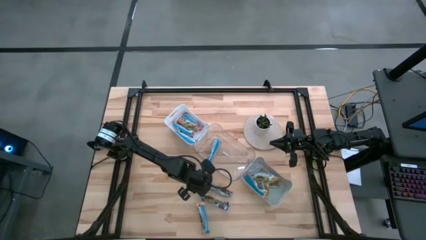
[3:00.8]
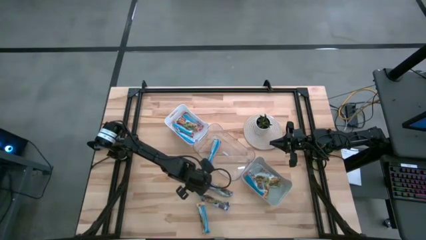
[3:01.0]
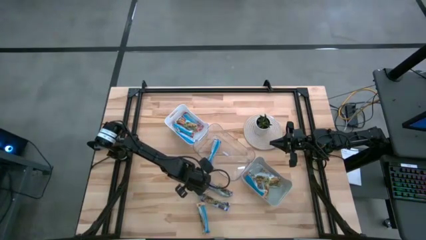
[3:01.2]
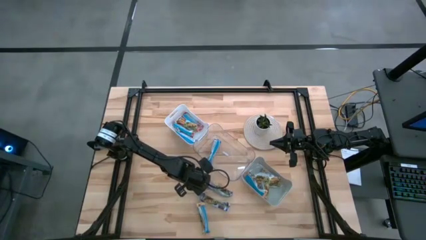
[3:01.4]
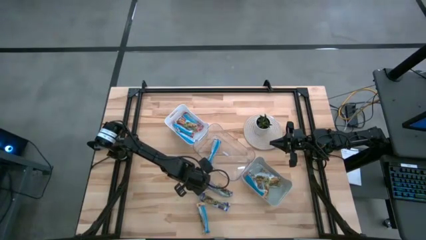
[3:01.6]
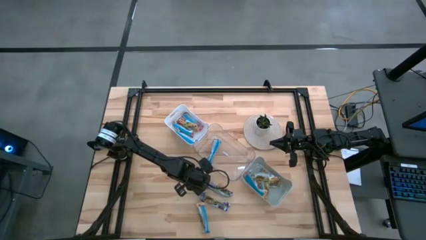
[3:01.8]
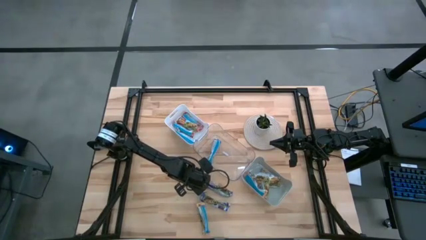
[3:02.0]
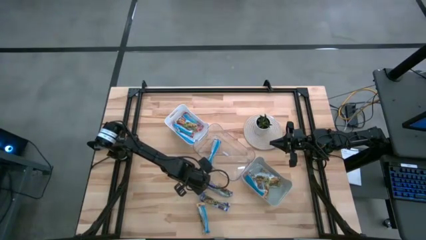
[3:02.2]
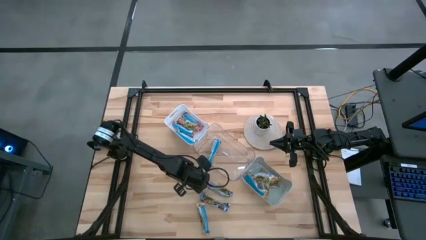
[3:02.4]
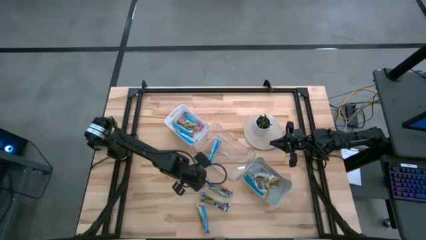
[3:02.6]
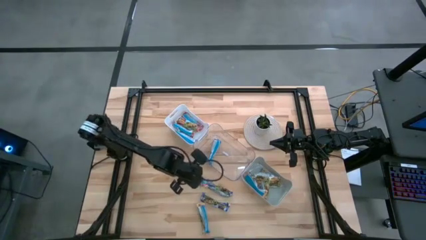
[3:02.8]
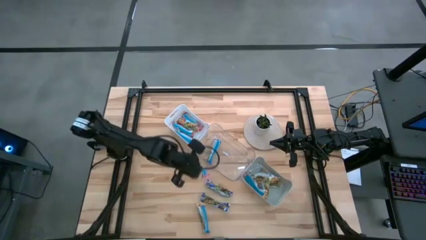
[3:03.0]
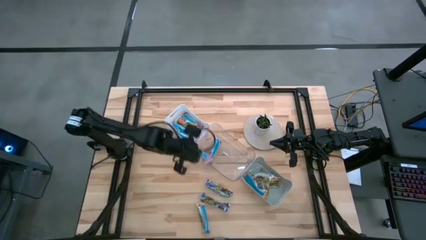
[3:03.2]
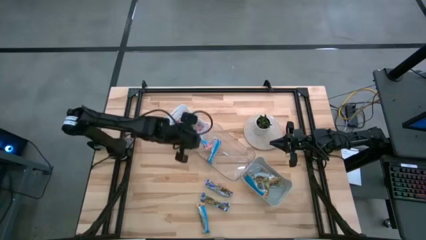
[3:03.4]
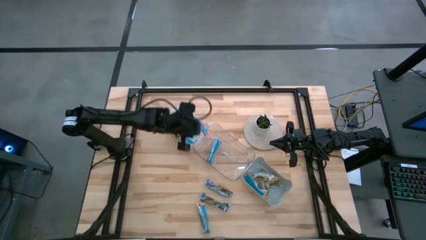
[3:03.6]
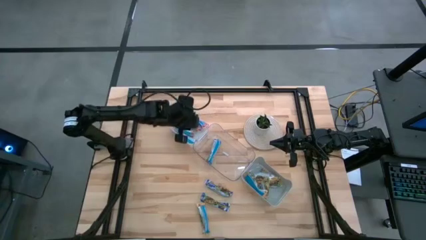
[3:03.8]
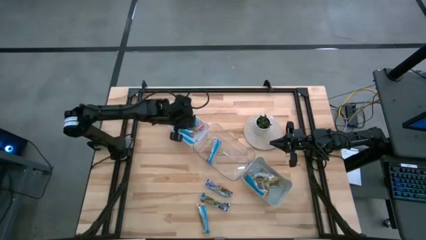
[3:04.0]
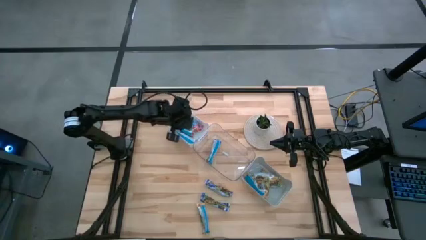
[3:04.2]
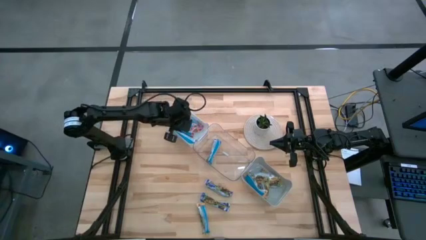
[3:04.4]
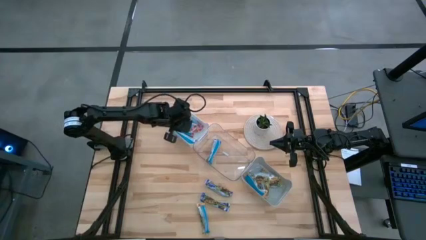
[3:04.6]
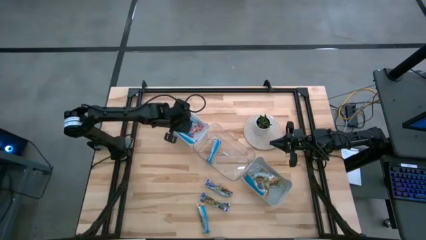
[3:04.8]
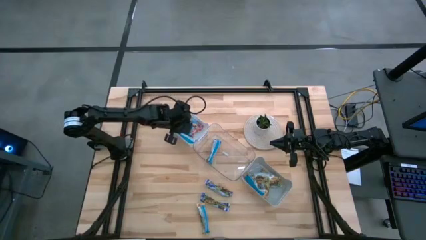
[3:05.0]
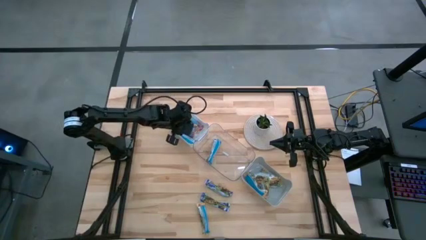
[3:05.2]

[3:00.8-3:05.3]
Task: Pick and place Granola Bars by type
Put the red granola bar into the white bin

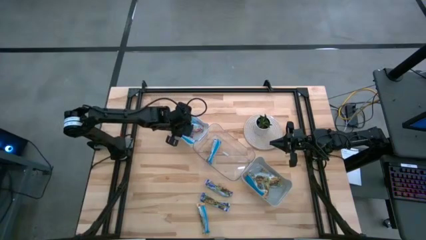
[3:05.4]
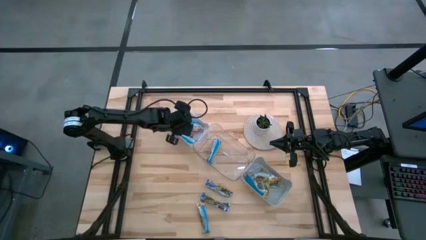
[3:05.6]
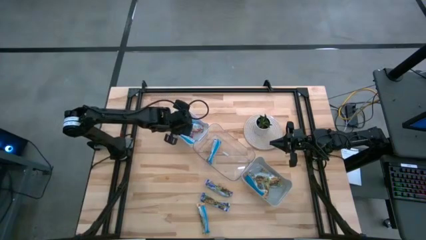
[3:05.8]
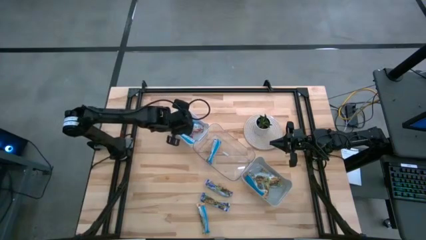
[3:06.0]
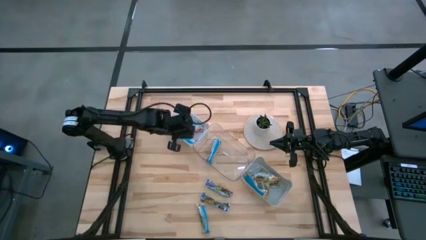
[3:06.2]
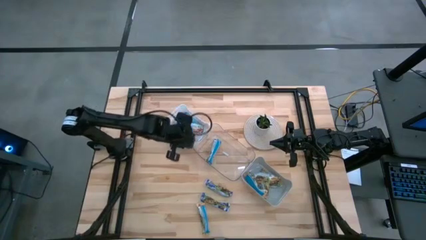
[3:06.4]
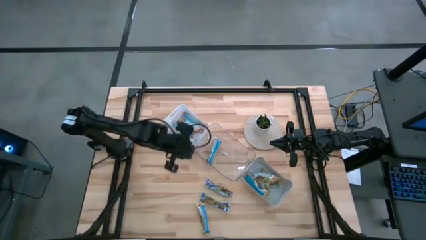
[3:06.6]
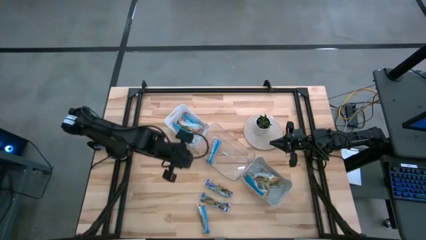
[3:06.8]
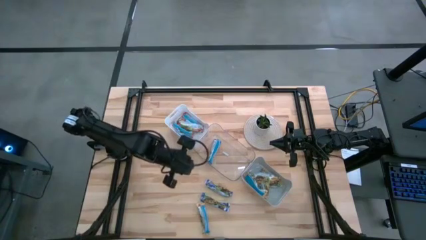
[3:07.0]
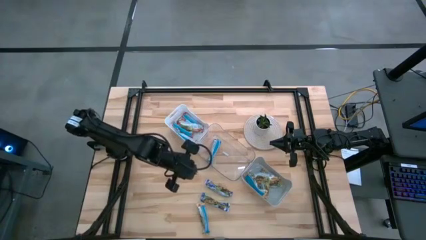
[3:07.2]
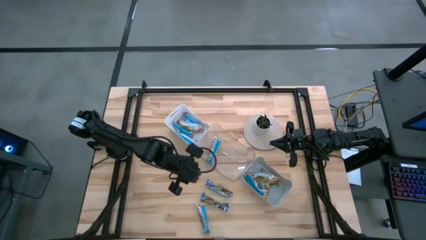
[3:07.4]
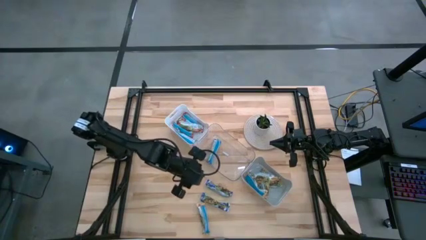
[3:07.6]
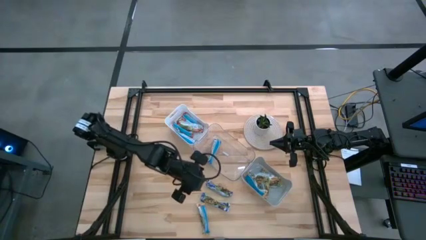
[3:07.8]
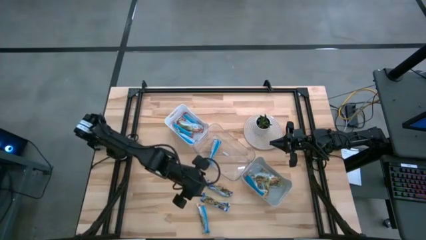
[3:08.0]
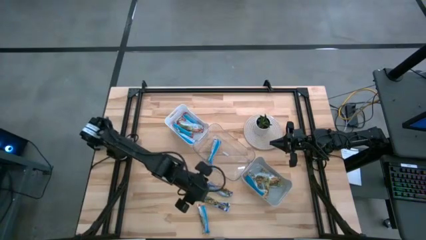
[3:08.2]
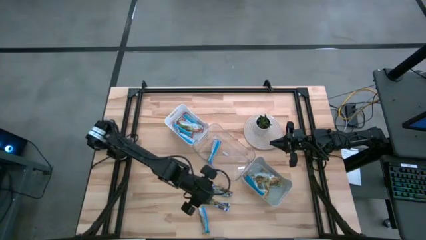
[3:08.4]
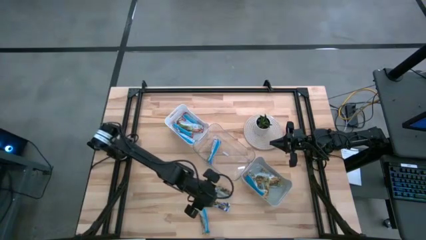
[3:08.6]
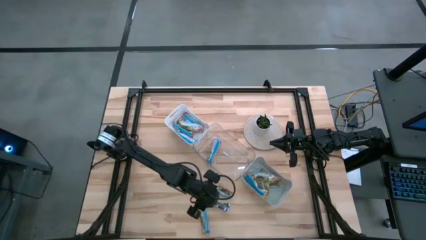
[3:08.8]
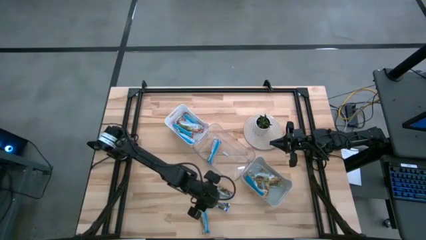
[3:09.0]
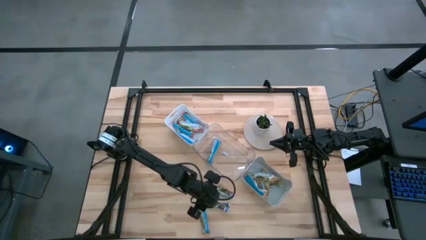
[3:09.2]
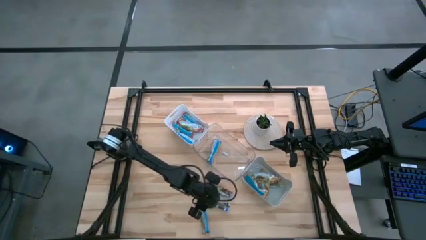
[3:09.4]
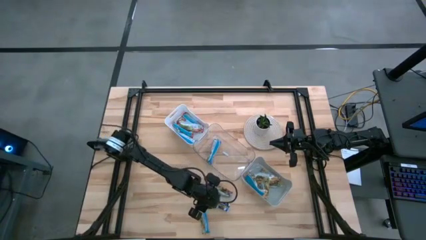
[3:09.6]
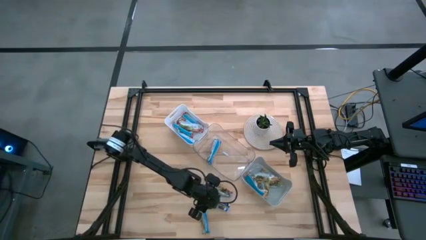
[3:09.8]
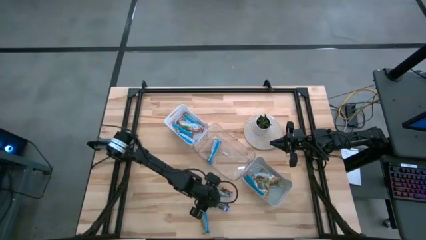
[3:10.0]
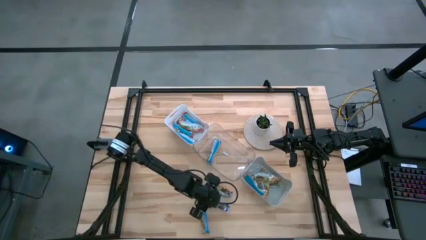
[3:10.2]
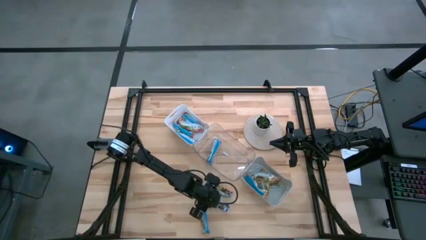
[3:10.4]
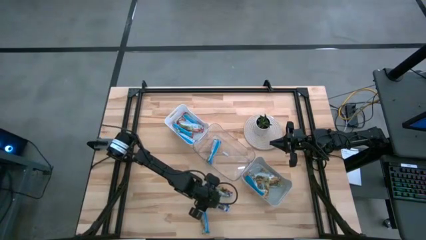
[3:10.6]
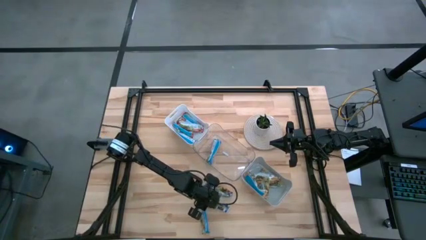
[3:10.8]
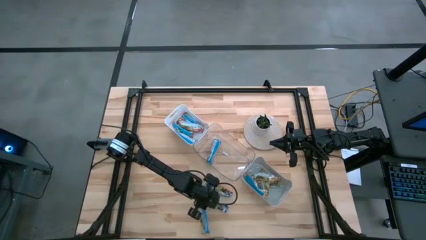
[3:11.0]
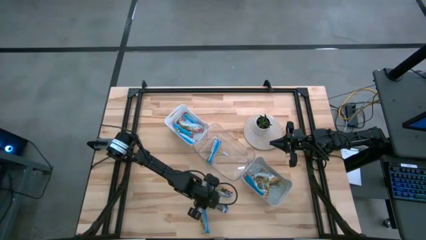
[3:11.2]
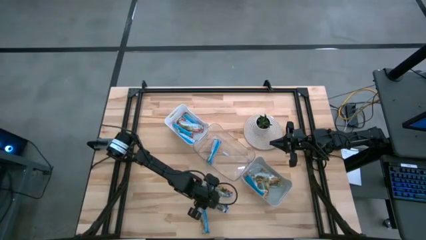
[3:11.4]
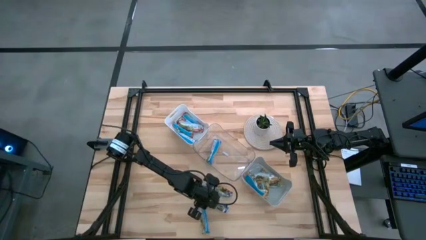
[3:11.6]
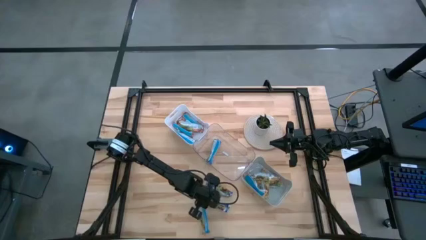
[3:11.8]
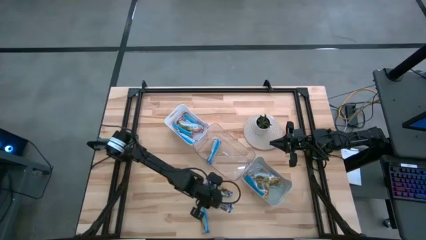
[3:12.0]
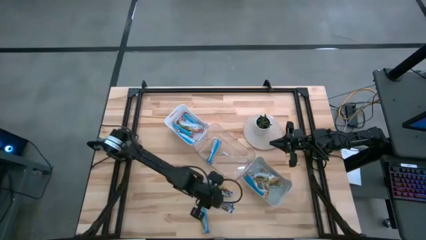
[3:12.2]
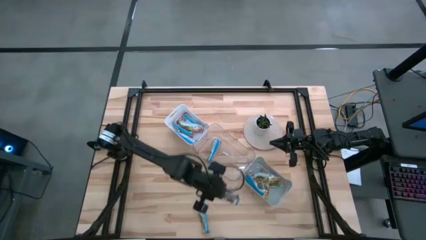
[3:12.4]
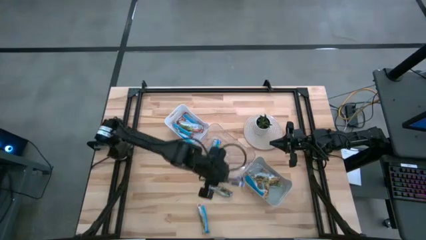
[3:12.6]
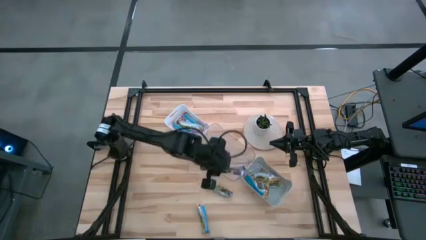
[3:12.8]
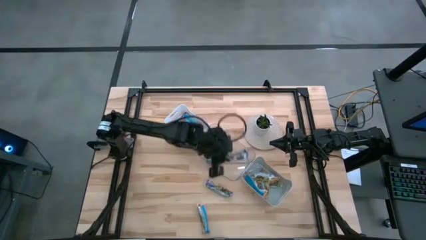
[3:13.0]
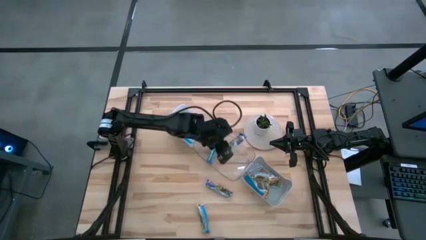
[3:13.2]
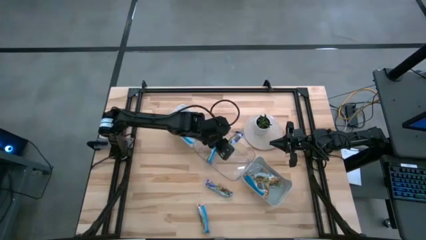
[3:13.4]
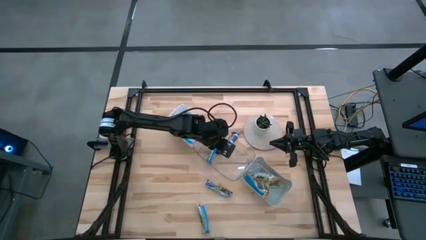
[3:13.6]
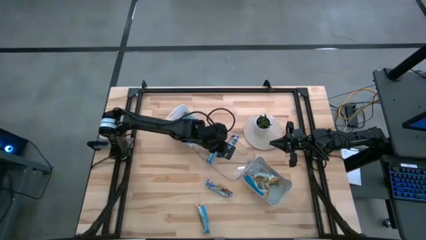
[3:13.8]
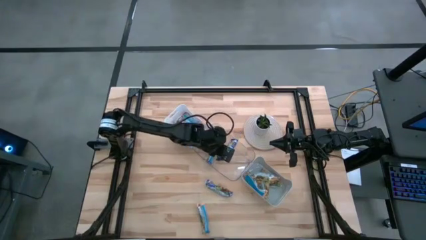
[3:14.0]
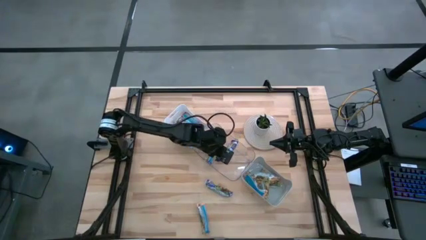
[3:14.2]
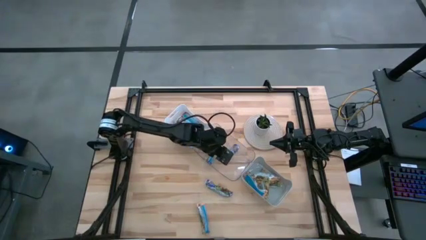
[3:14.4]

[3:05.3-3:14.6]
Put the blue granola bar into the transparent bin

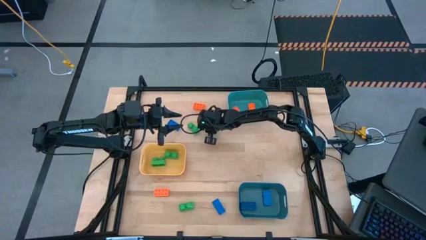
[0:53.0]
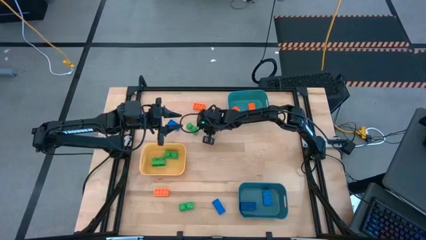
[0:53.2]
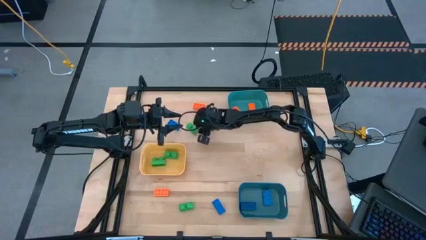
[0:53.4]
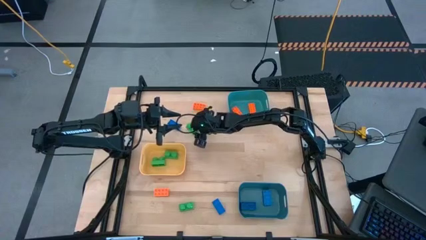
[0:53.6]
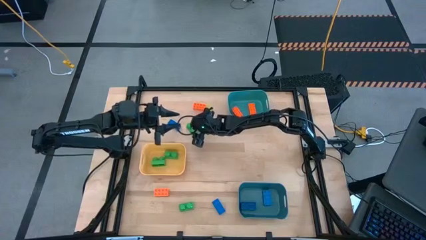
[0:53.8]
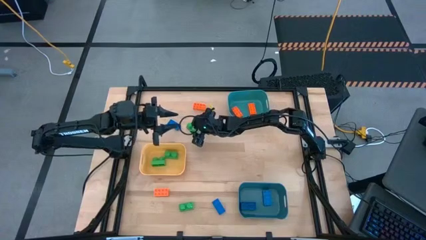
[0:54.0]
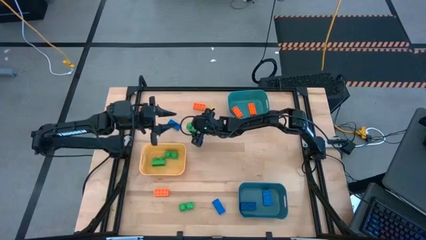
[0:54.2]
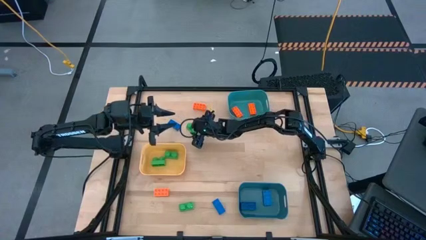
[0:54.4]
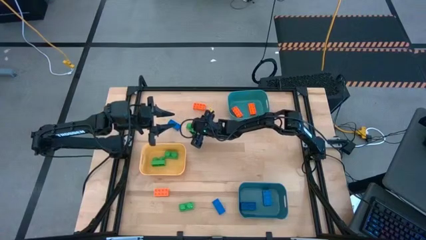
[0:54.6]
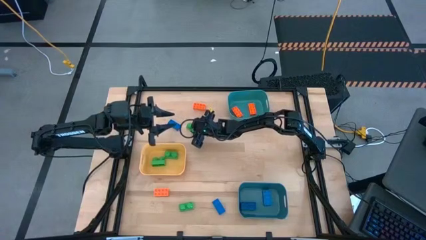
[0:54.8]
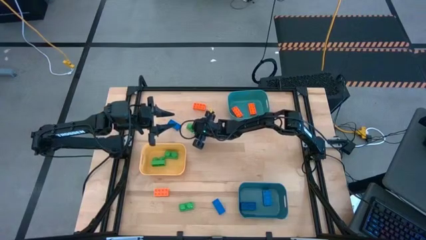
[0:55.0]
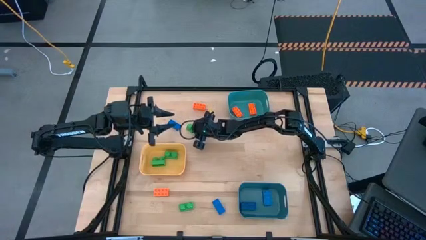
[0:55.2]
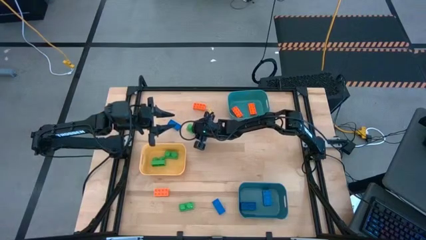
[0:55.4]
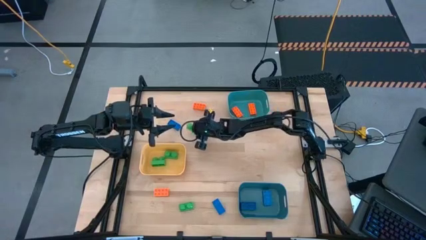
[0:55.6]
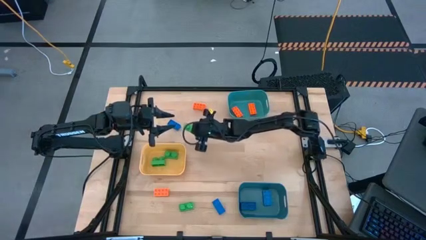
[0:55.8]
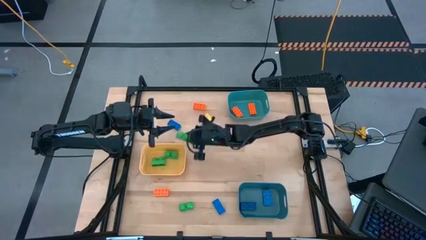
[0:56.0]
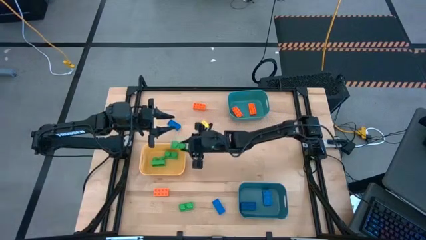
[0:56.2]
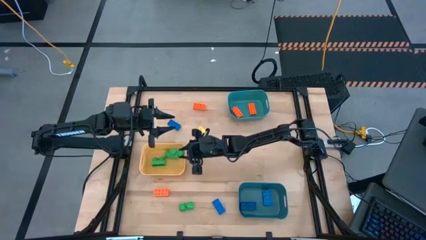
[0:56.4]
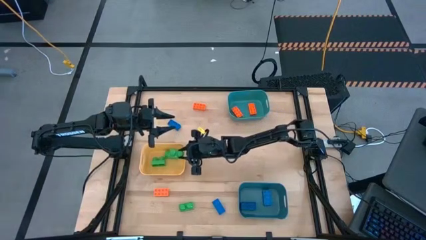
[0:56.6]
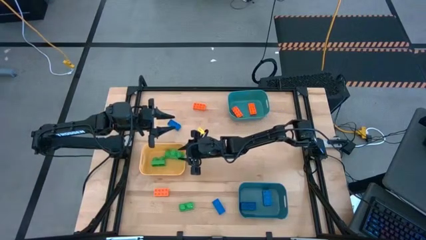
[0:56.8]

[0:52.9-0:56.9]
Task: Sort & place blocks by color
Put the green game piece into the yellow bin
